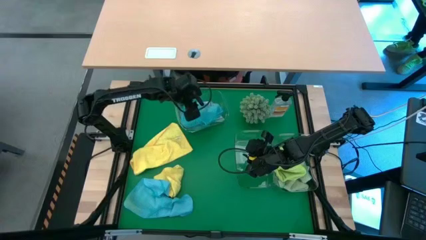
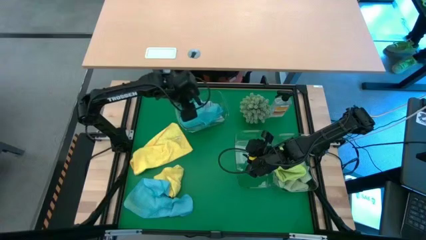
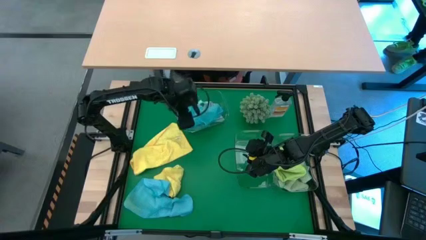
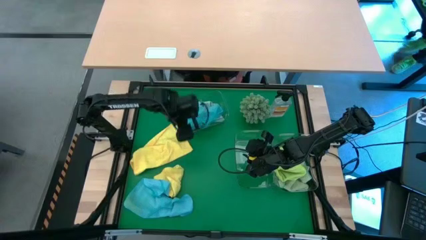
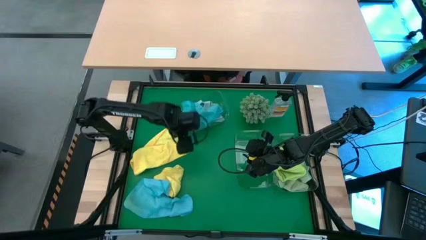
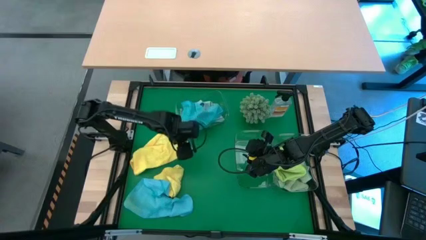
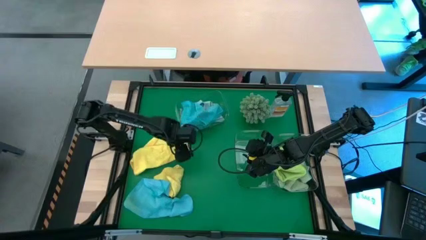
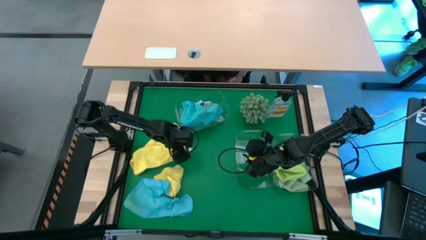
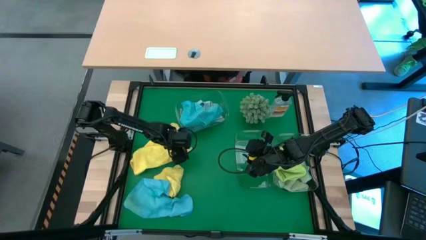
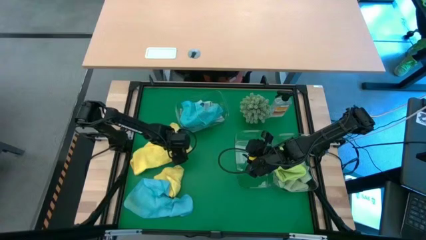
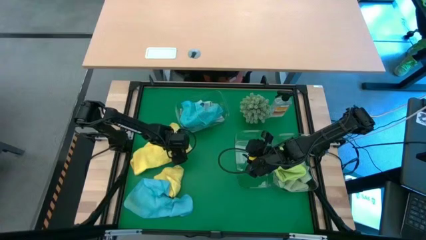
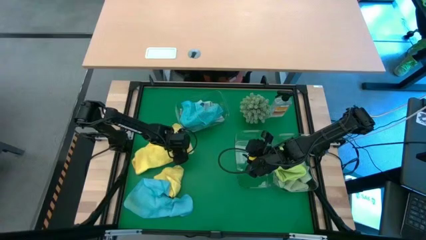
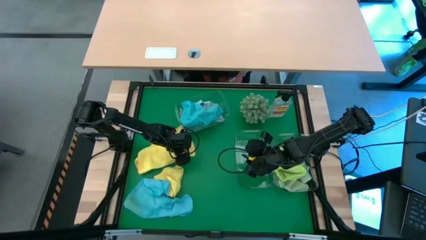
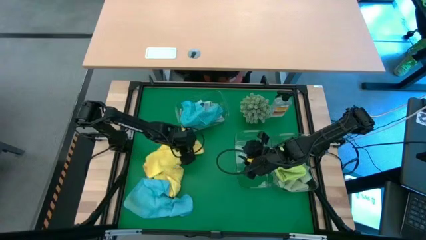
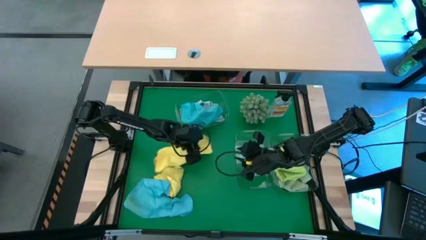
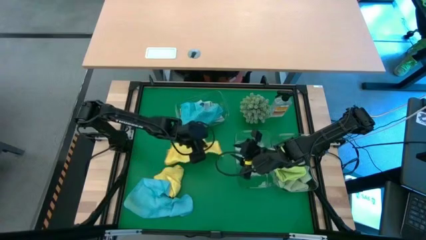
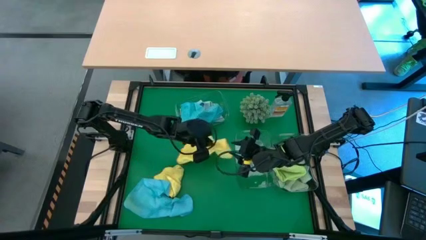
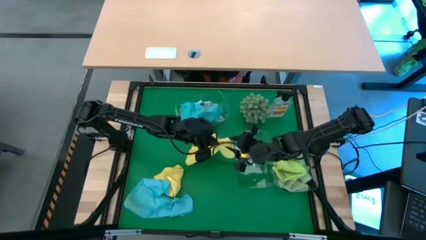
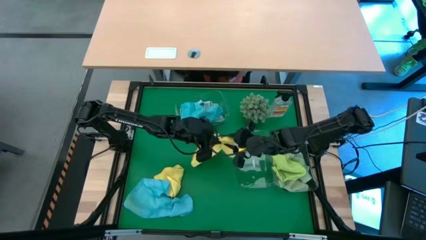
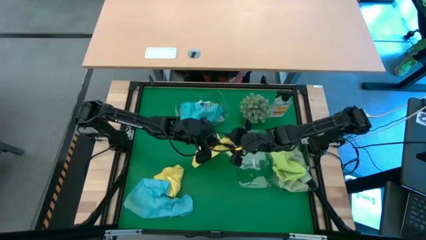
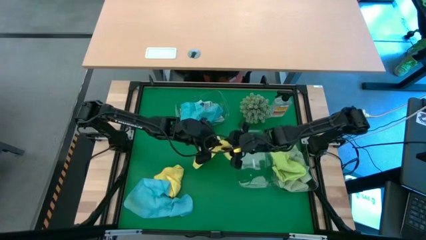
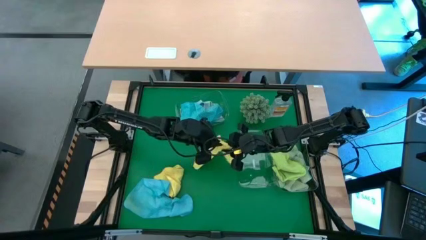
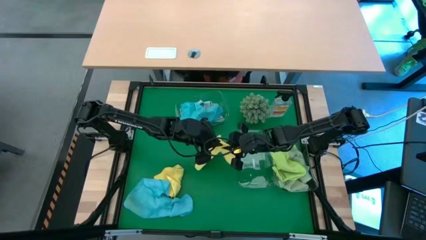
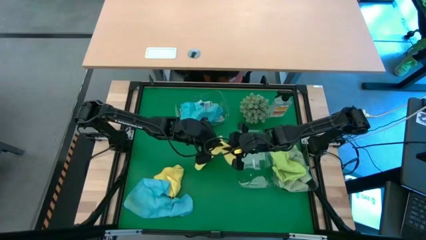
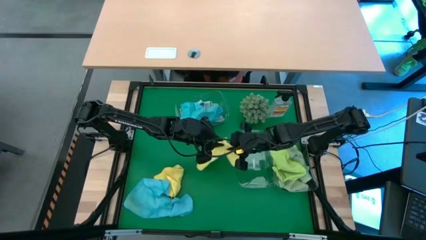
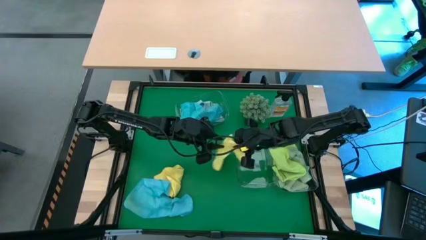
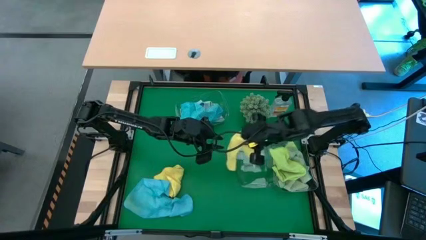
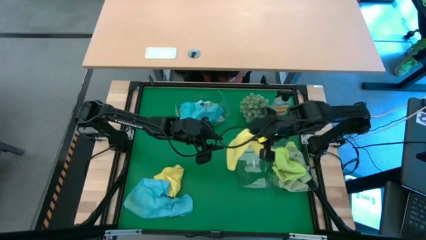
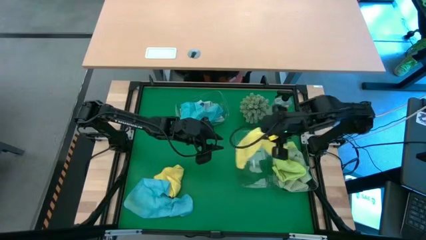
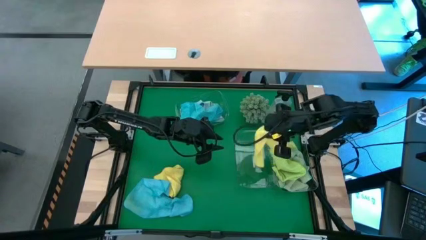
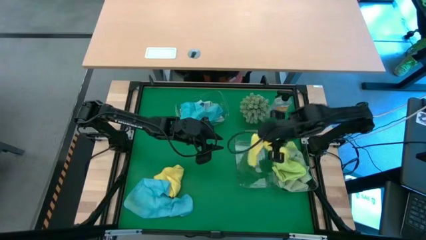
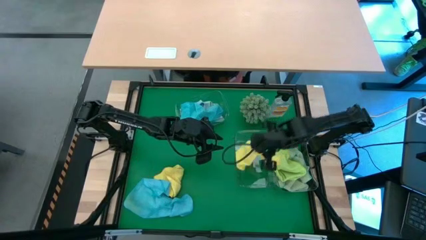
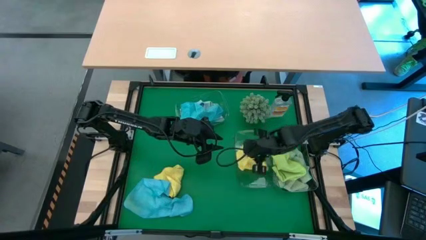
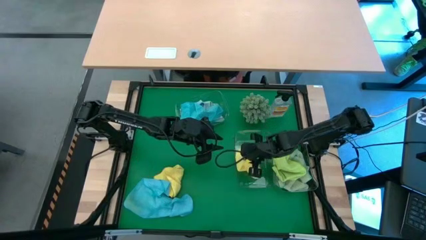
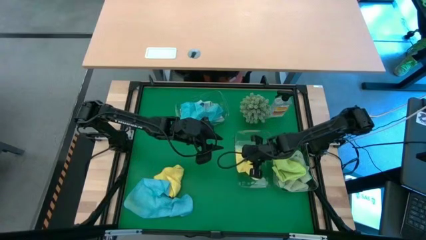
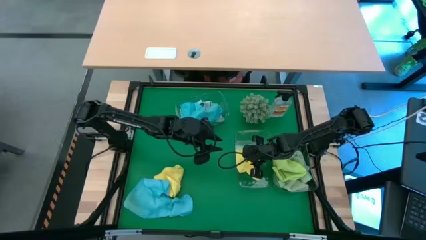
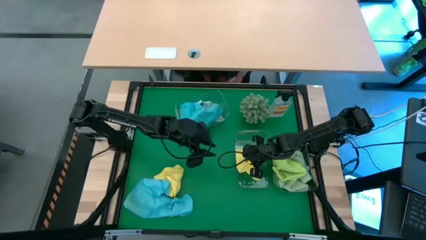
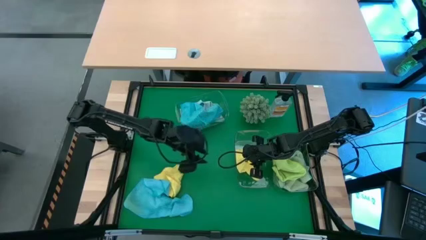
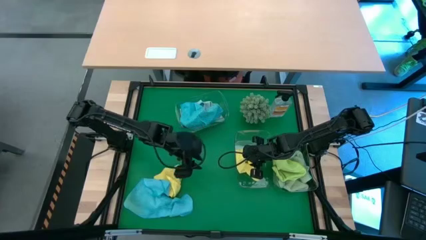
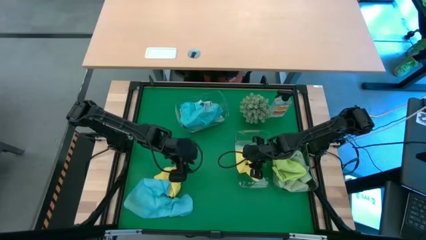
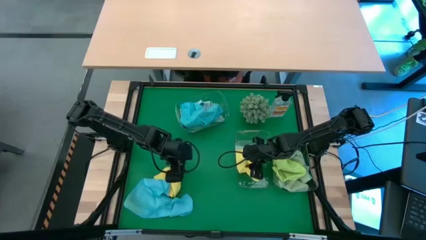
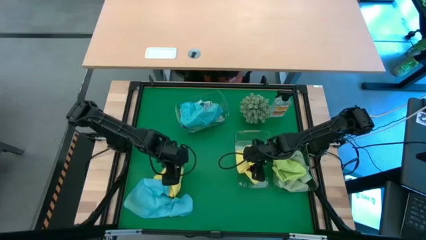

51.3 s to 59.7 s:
Task: Sort microfiber towel by color & place in baskets
Put the top yellow towel into the bottom left transparent bin

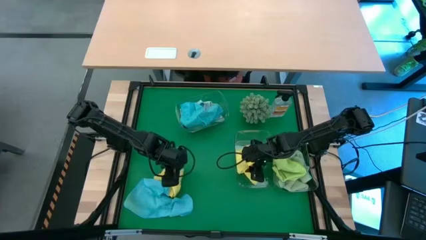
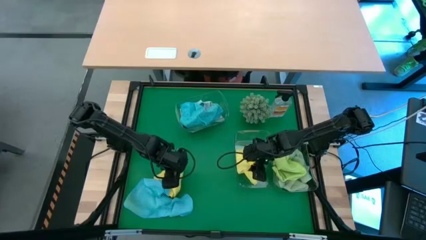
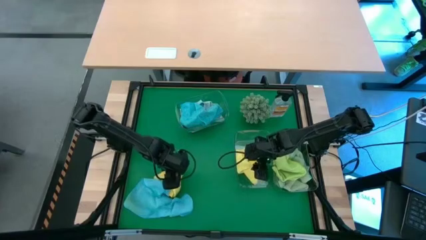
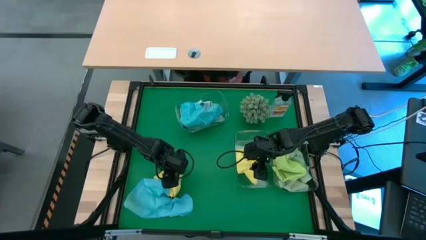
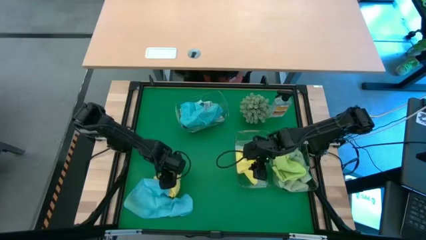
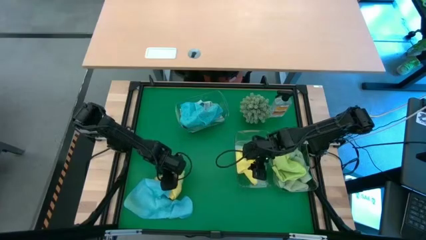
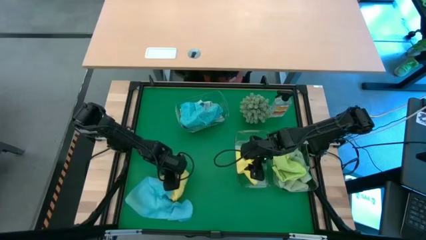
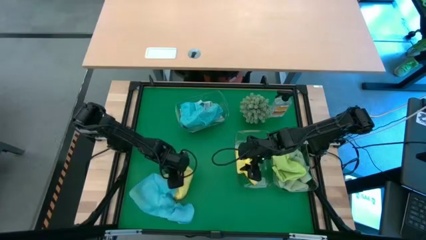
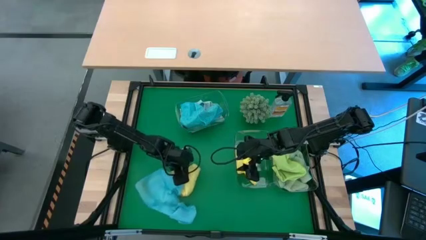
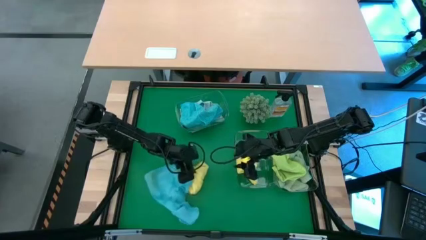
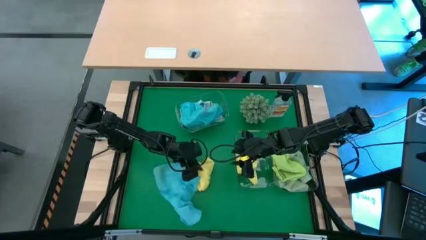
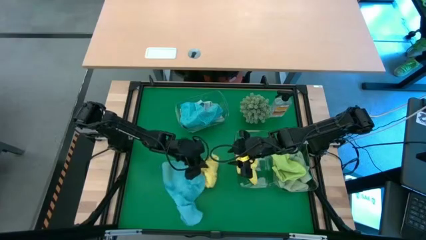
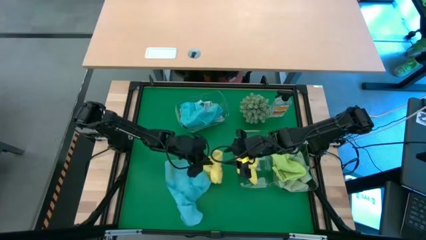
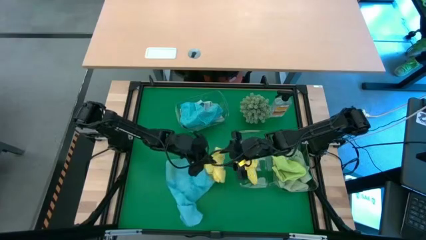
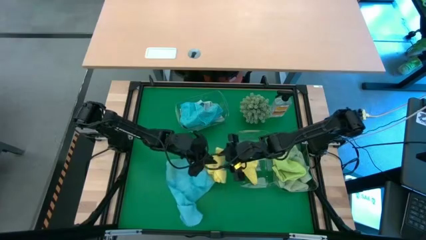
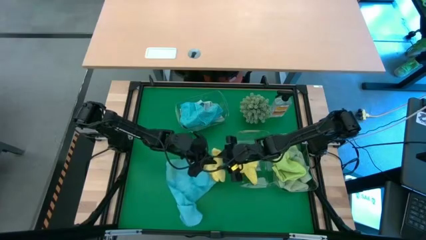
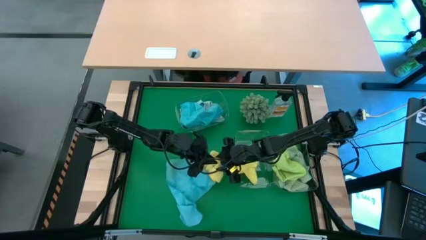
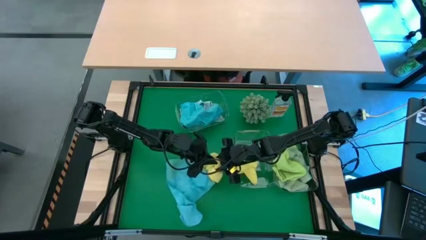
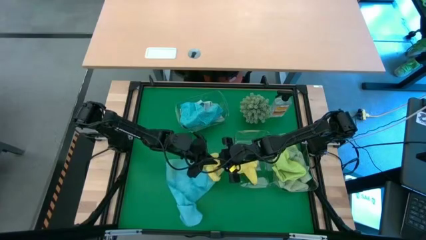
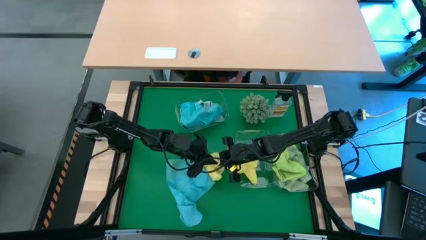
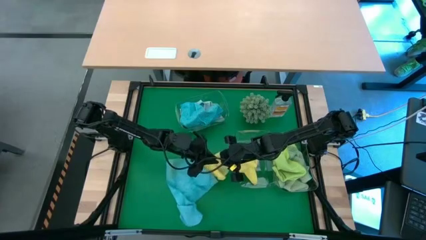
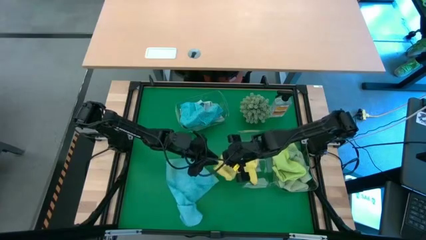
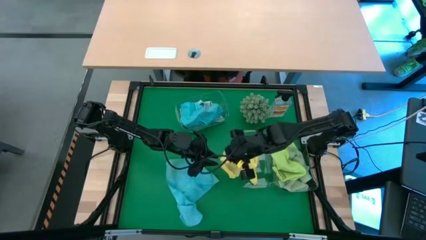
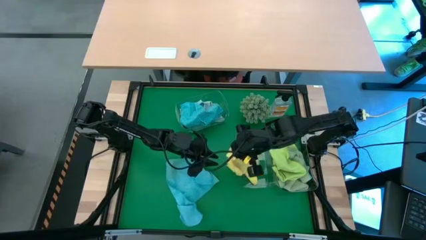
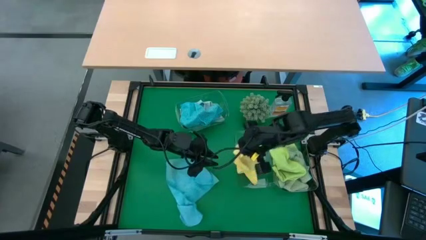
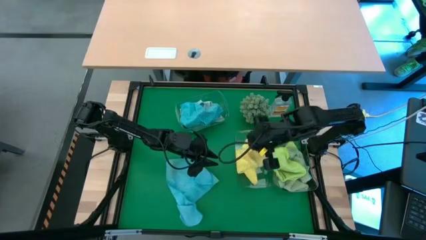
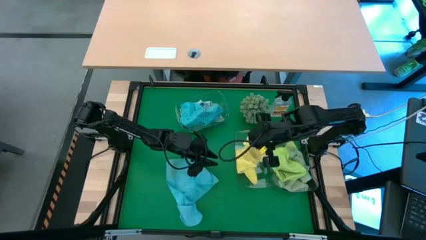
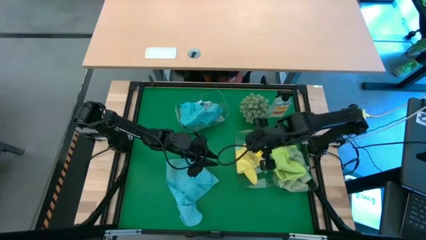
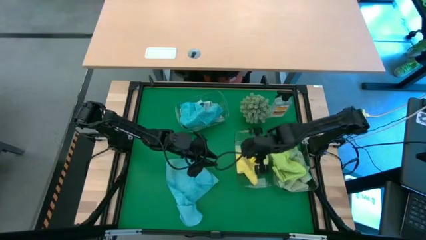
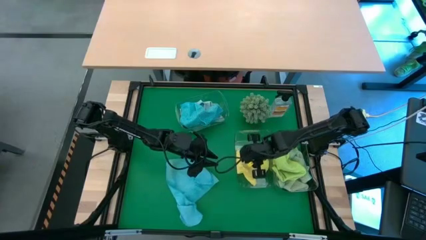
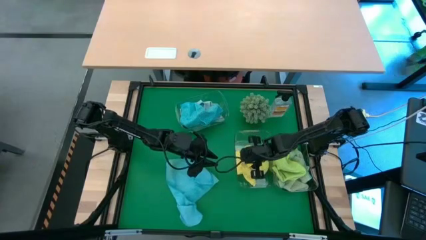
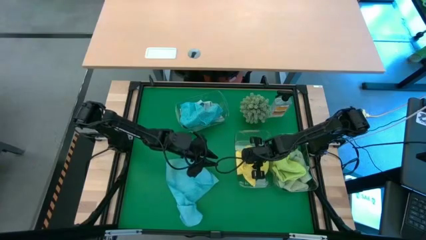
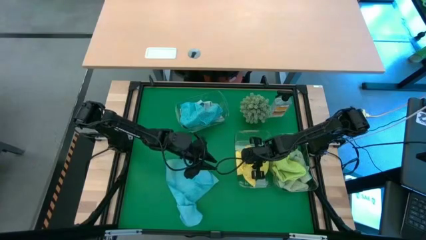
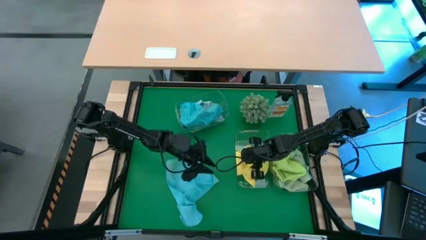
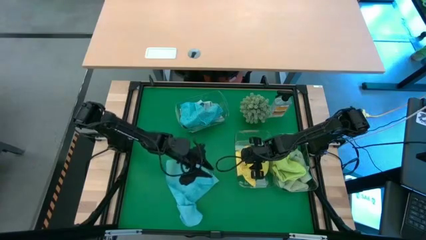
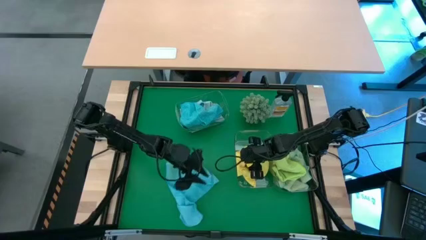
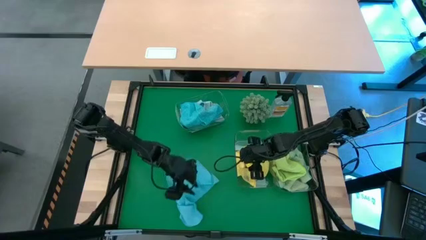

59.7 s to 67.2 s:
Put the yellow towel into the bottom left transparent bin
